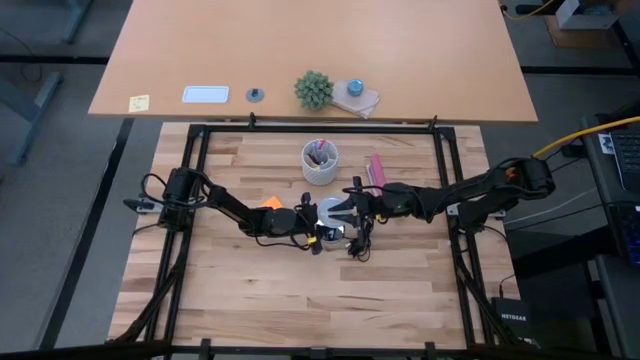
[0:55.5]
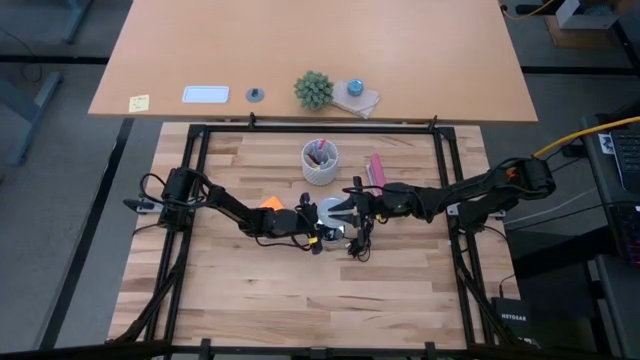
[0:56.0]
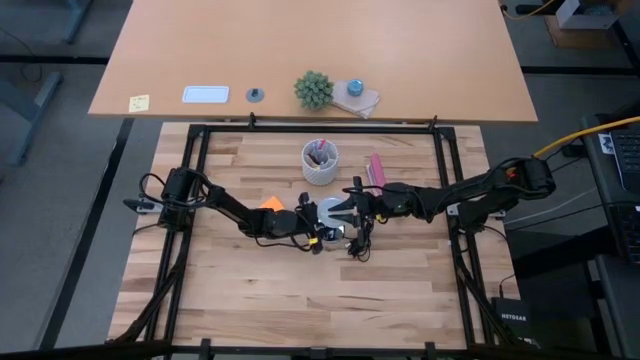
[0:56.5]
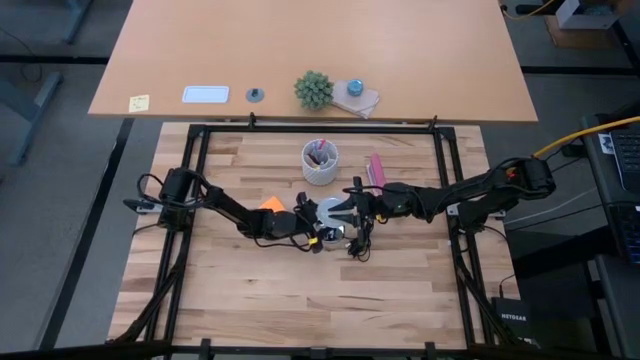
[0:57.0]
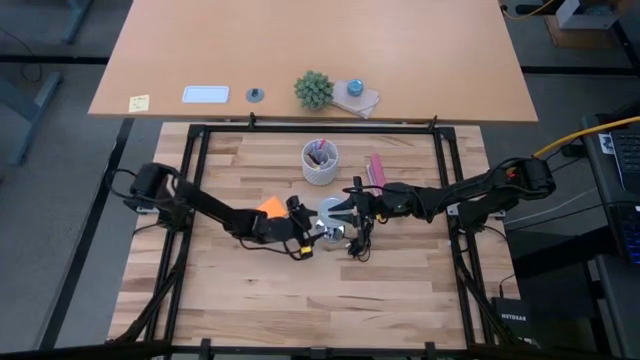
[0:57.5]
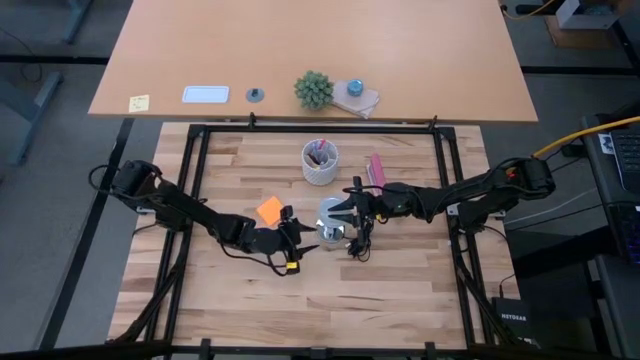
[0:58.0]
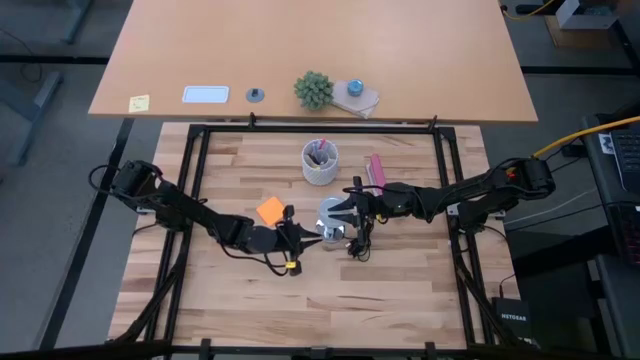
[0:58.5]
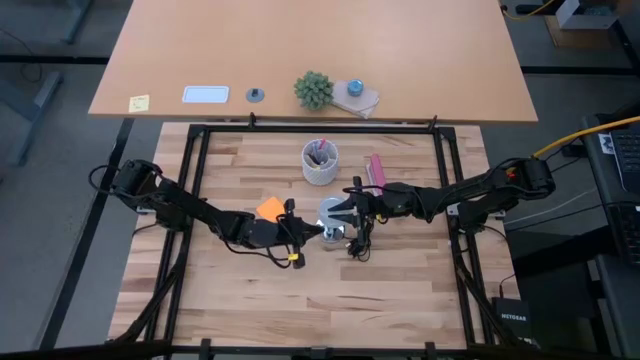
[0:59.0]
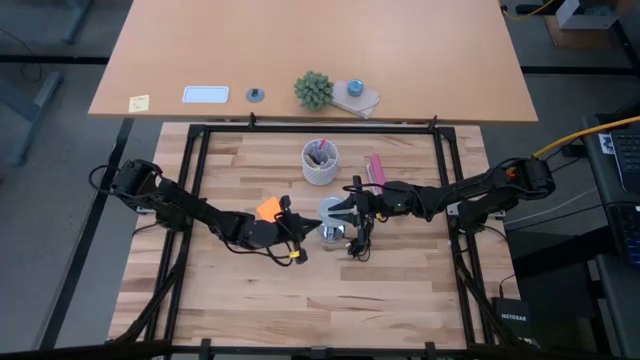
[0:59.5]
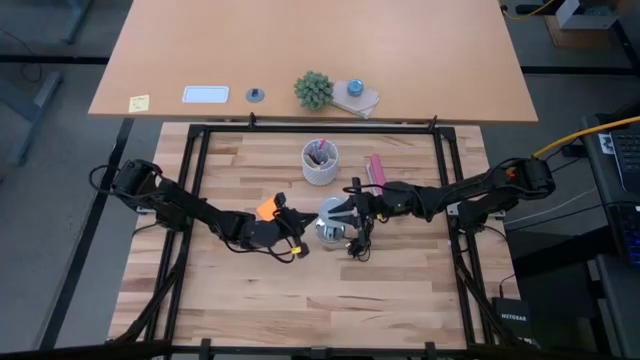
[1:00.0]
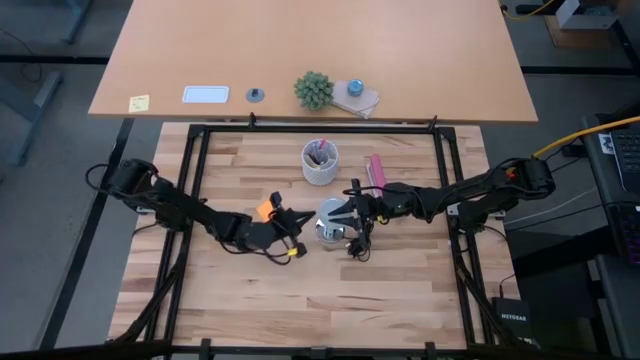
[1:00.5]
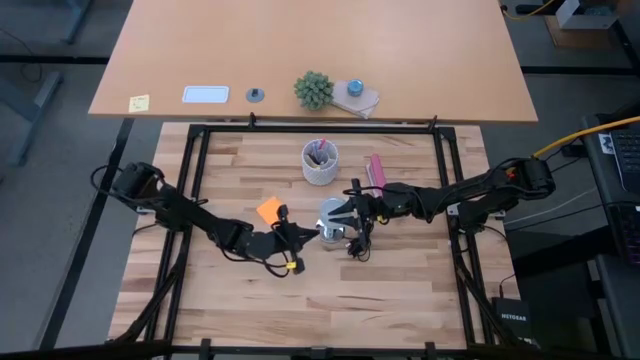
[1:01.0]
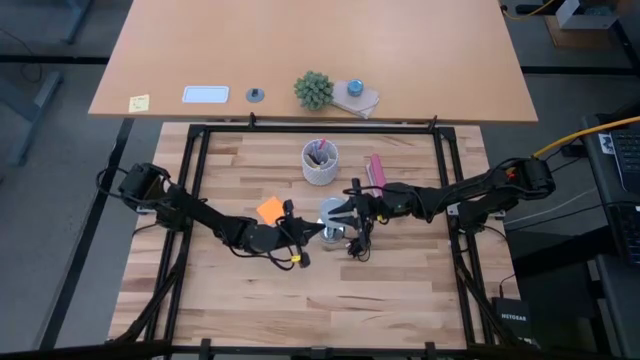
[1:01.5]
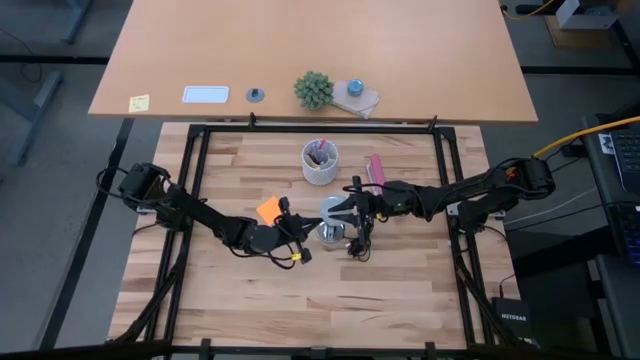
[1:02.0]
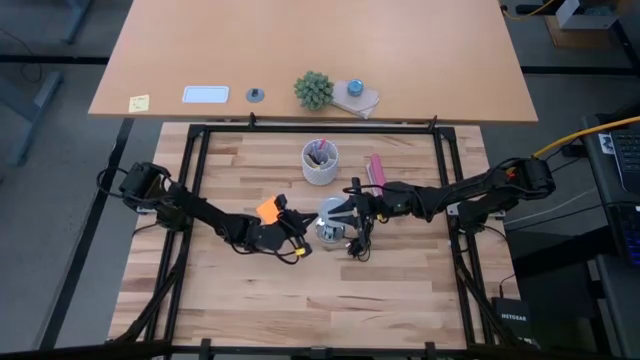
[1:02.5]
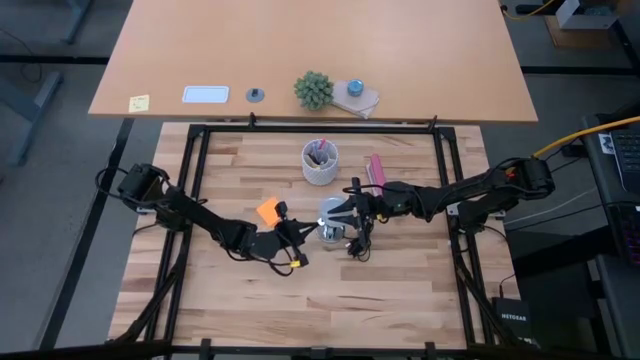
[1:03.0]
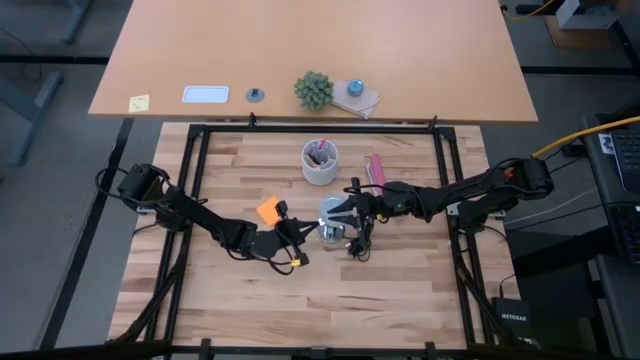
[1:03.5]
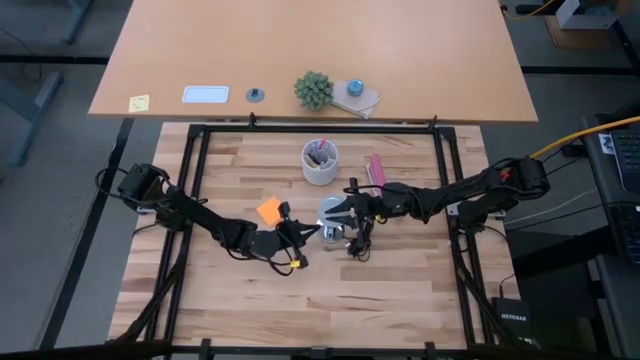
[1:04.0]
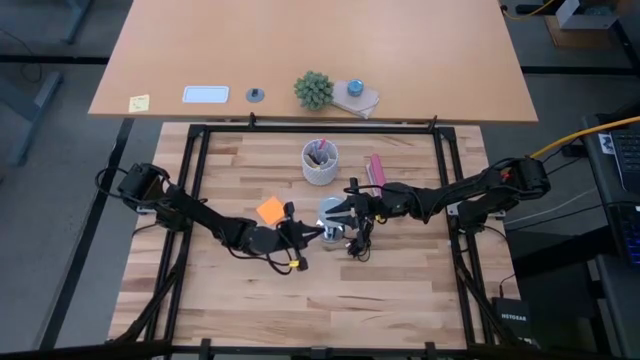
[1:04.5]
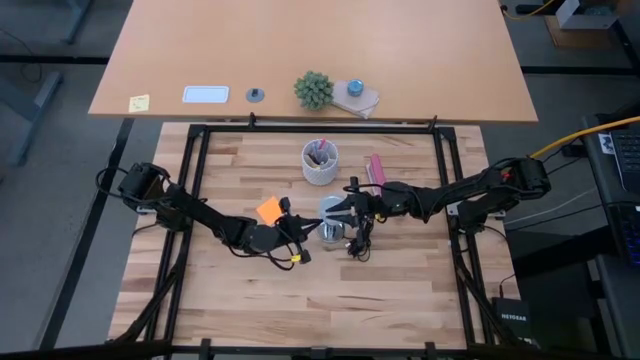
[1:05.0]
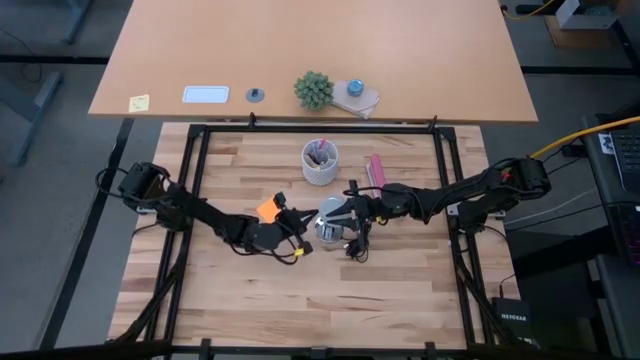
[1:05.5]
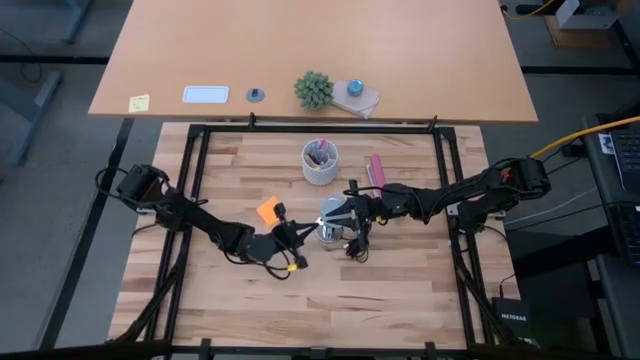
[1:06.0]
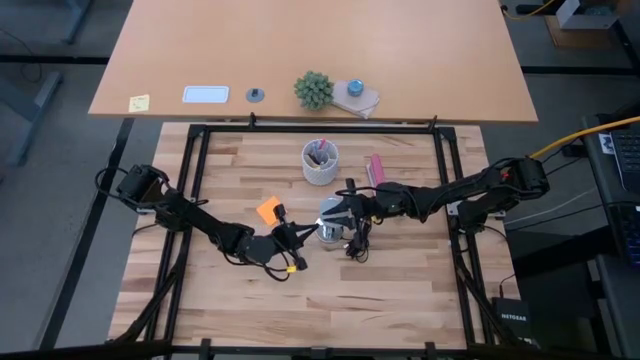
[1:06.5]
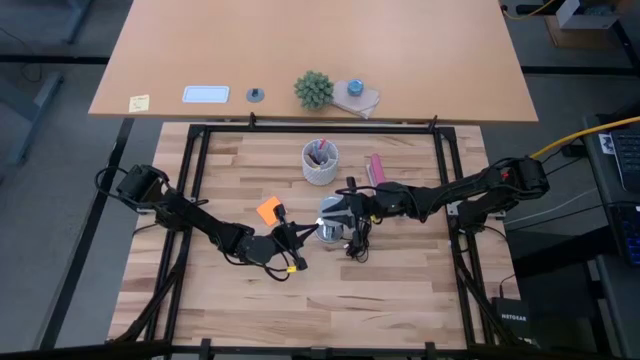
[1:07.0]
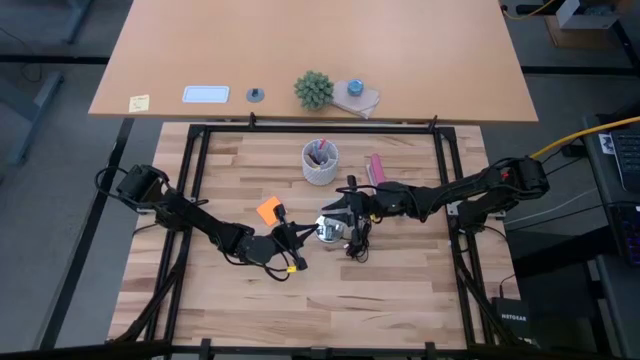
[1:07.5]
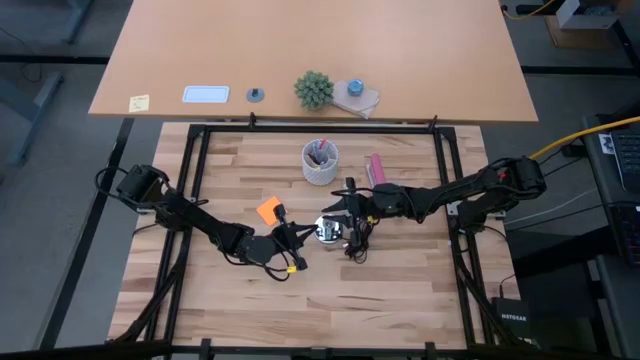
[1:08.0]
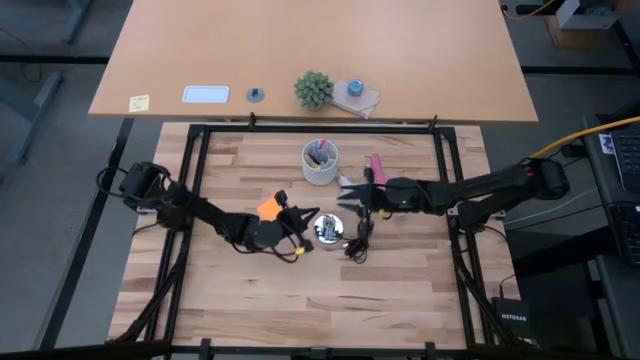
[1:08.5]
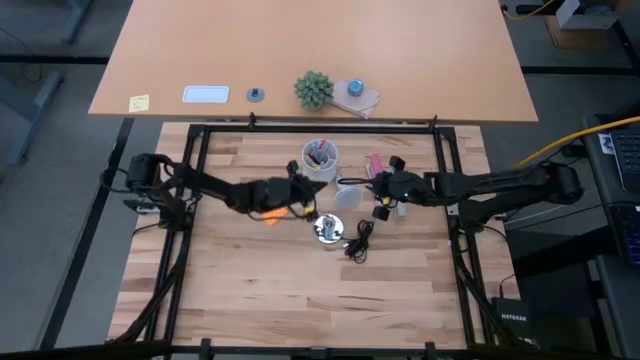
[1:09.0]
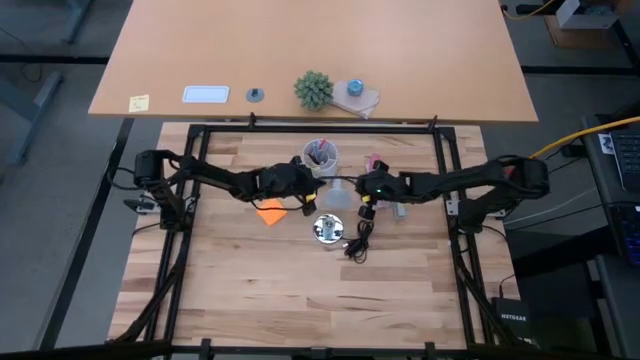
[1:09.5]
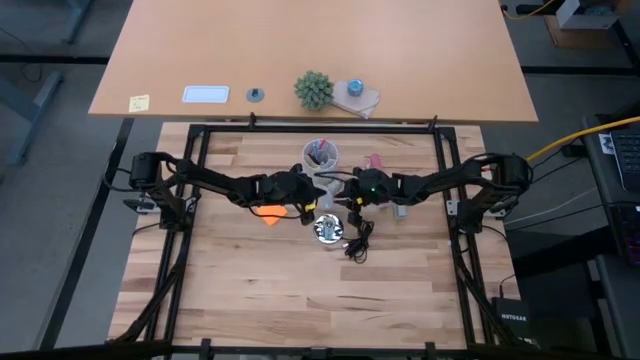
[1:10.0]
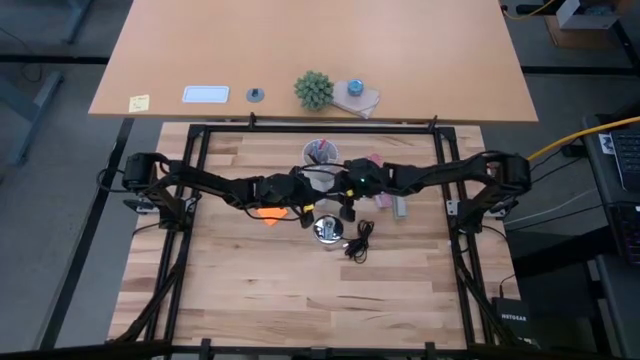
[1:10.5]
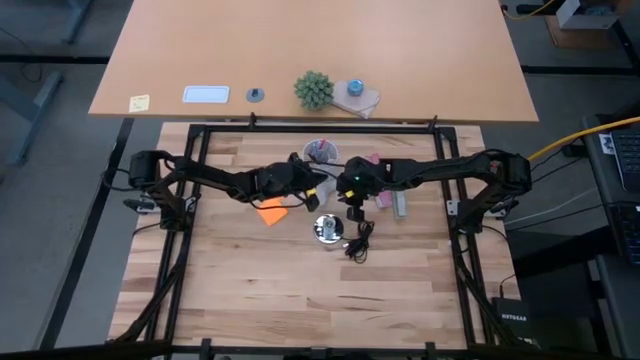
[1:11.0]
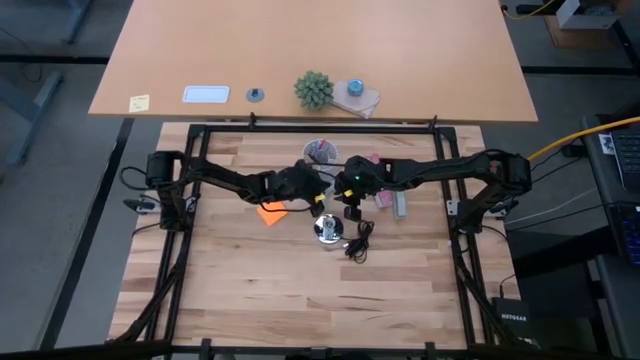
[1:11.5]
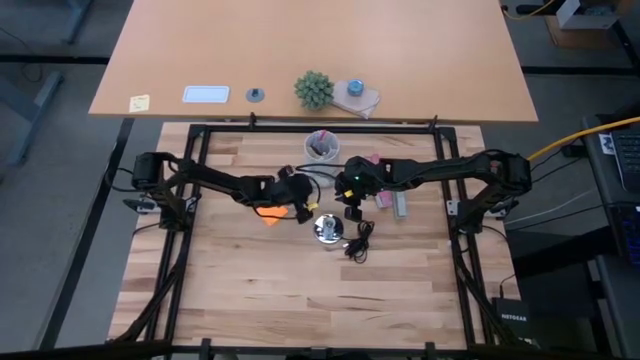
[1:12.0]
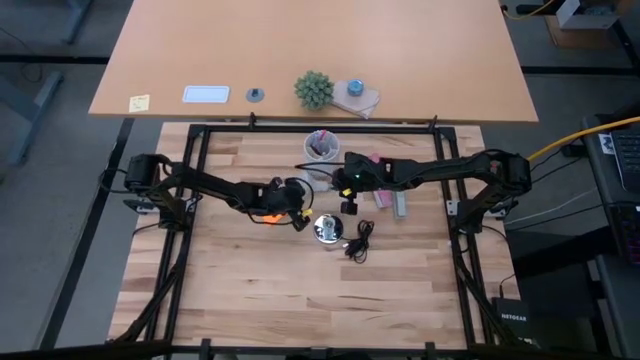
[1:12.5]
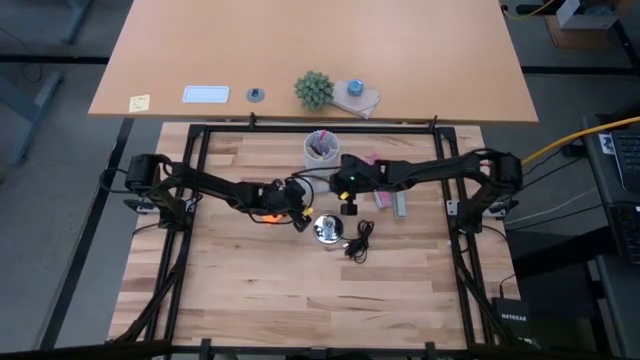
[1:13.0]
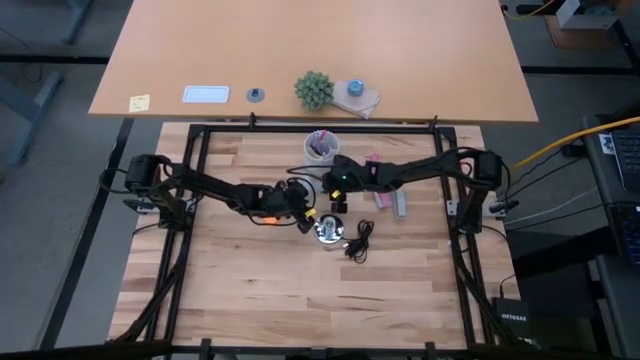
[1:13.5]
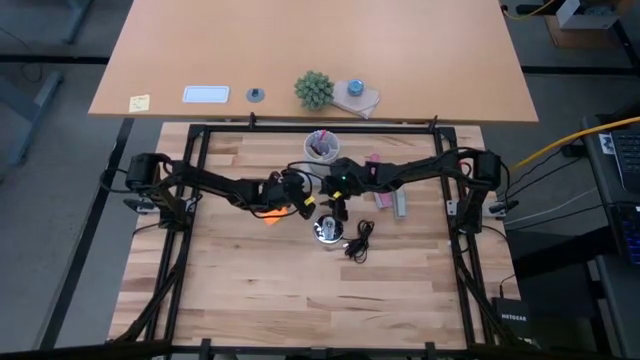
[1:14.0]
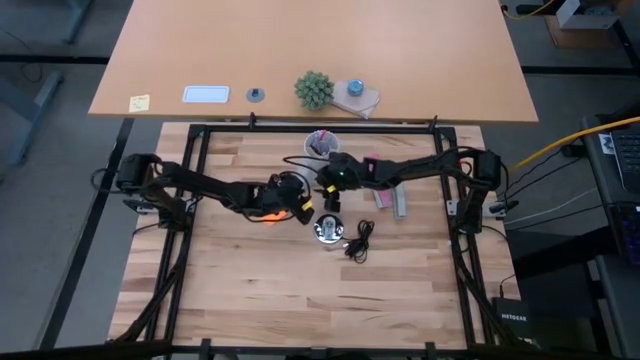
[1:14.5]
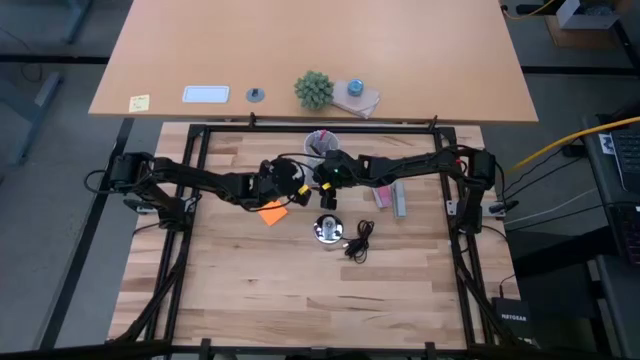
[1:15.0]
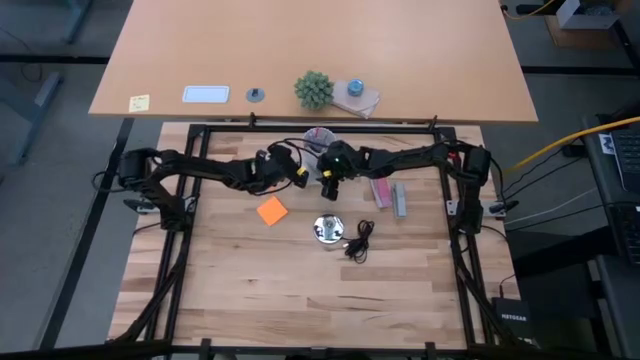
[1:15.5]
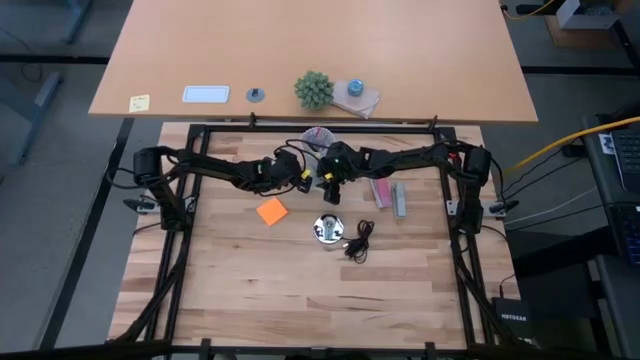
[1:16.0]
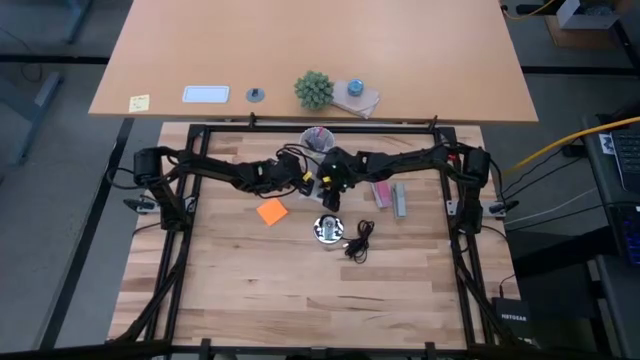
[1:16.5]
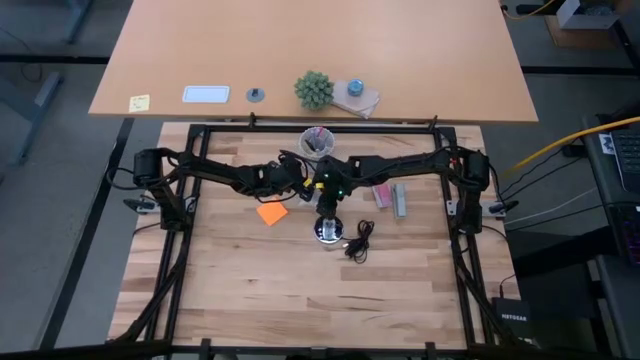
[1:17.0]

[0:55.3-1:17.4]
Task: Screw lightbulb
Insert the lightbulb into the lamp
